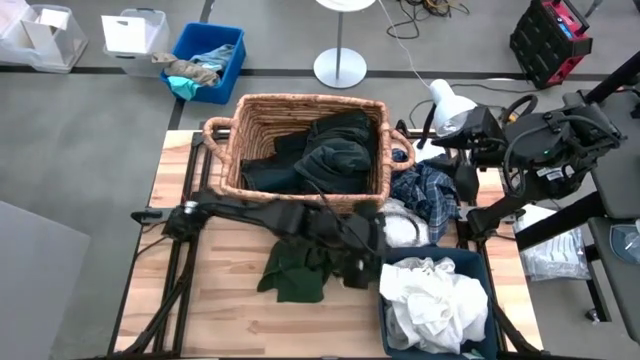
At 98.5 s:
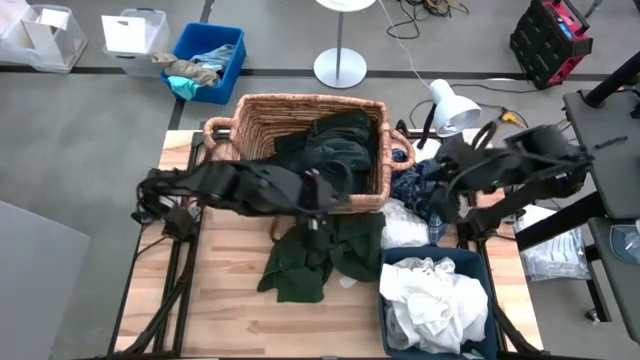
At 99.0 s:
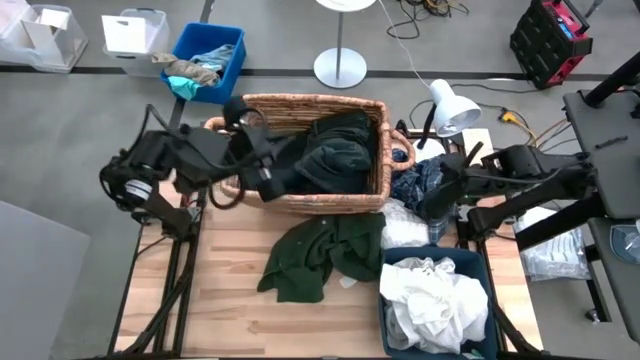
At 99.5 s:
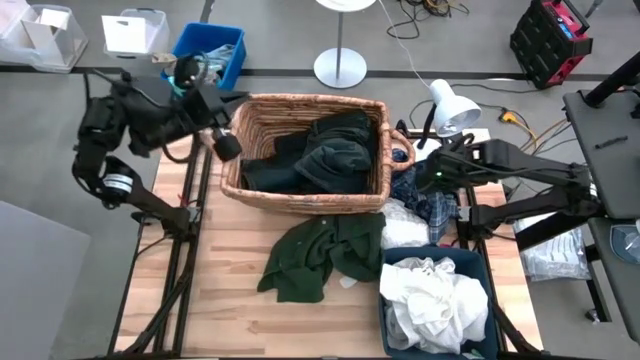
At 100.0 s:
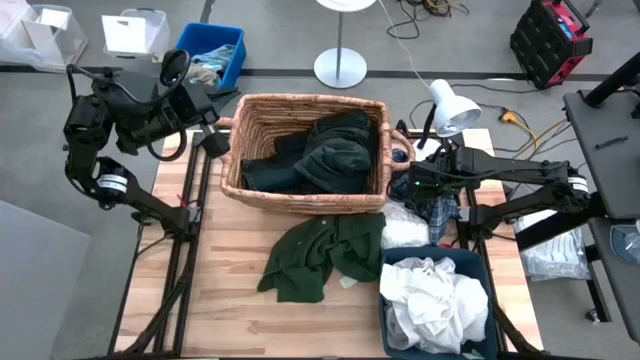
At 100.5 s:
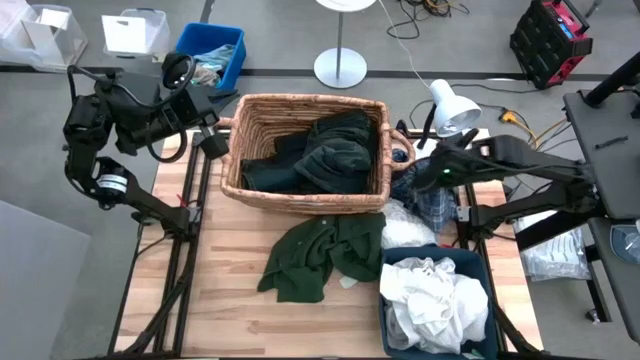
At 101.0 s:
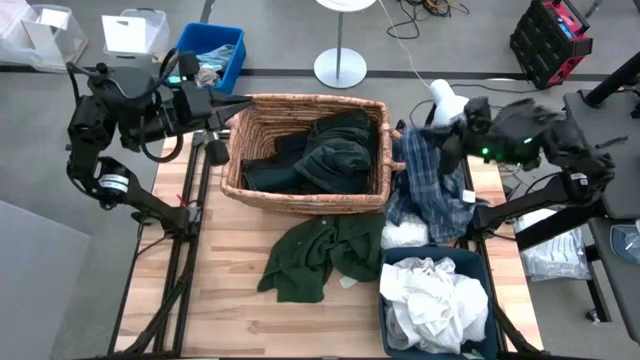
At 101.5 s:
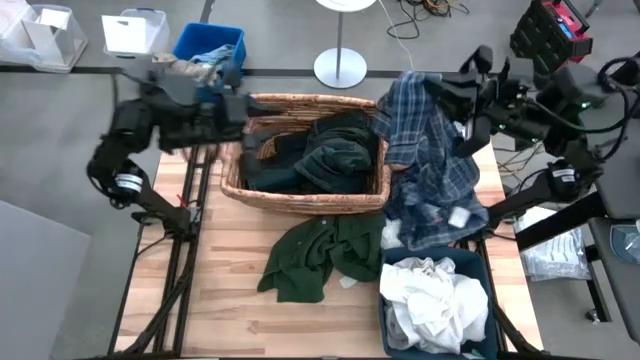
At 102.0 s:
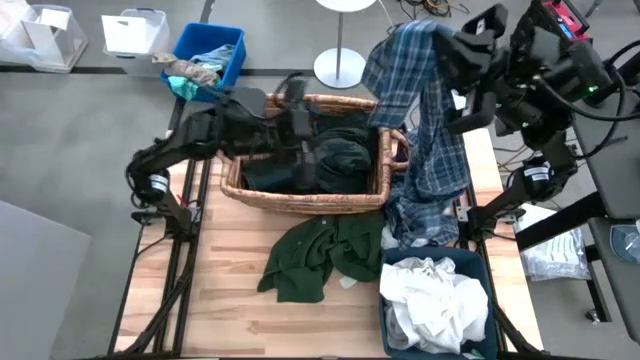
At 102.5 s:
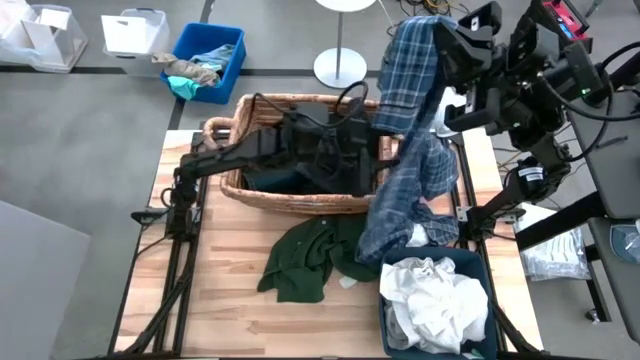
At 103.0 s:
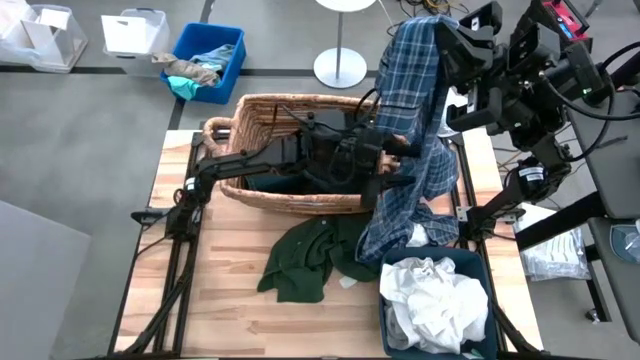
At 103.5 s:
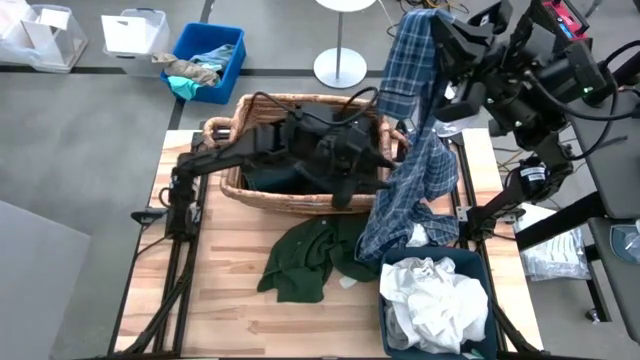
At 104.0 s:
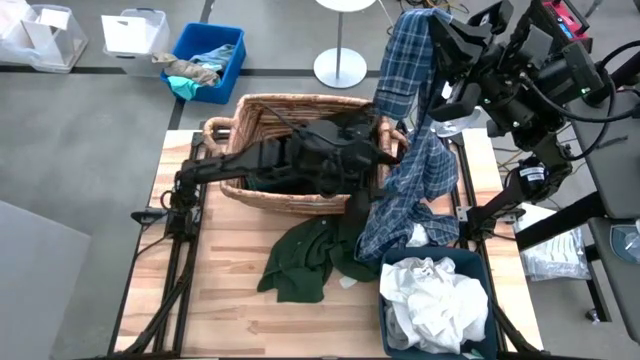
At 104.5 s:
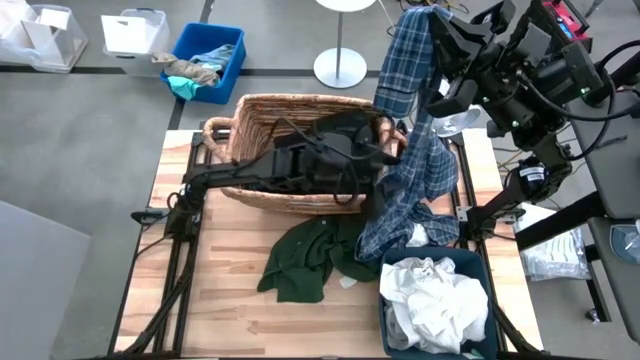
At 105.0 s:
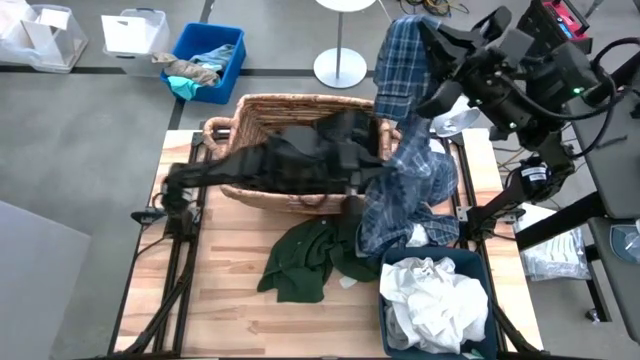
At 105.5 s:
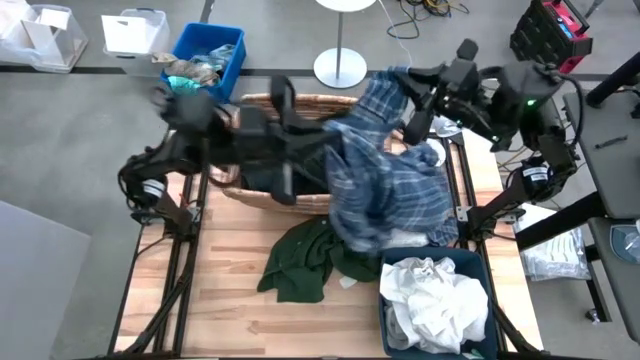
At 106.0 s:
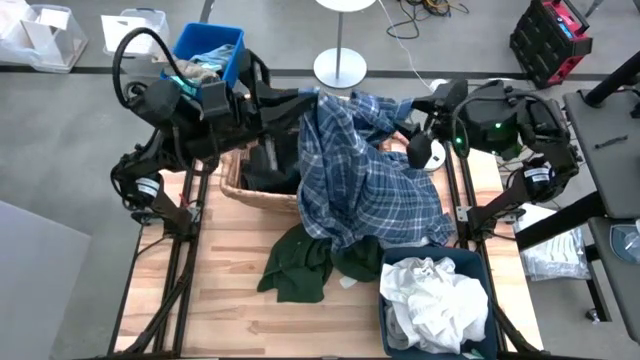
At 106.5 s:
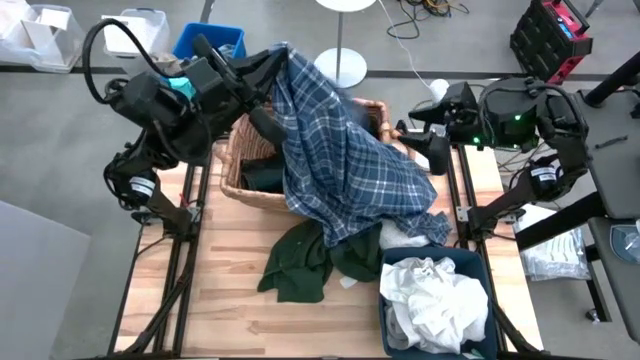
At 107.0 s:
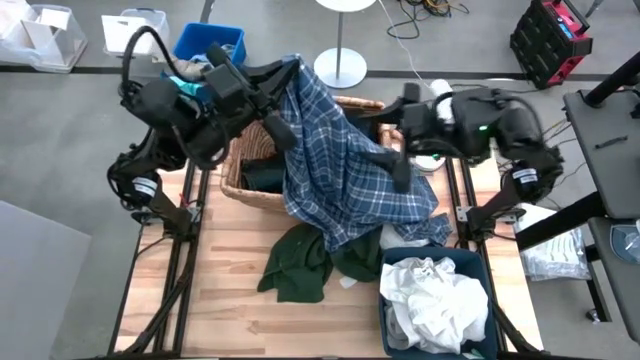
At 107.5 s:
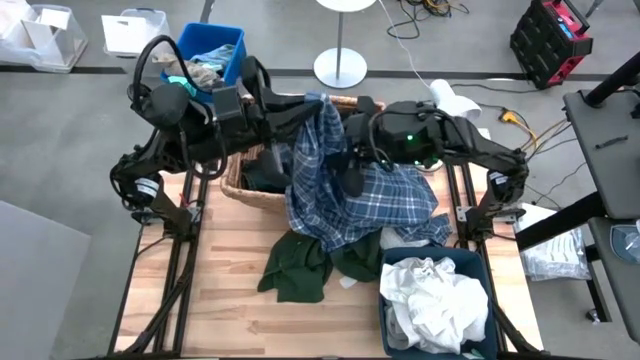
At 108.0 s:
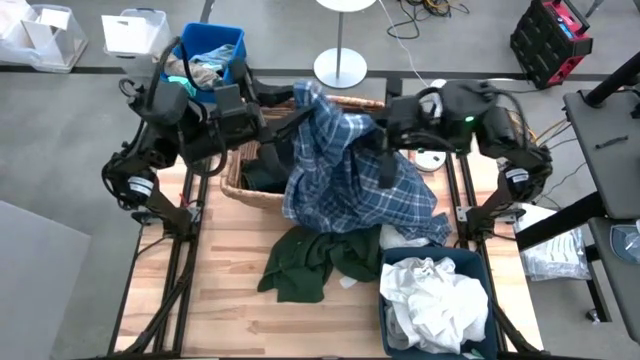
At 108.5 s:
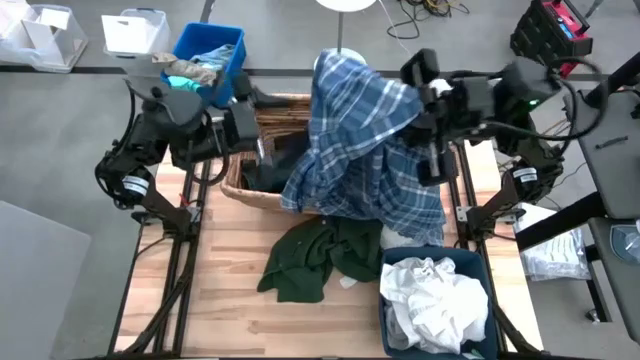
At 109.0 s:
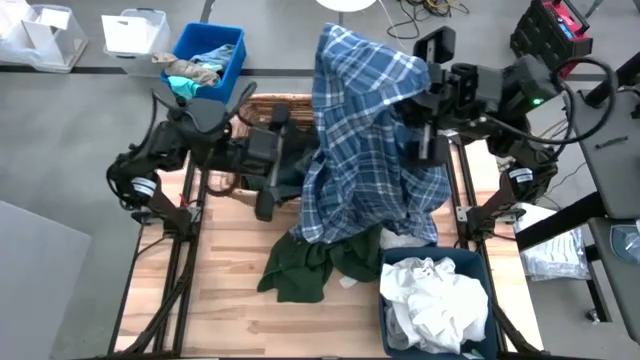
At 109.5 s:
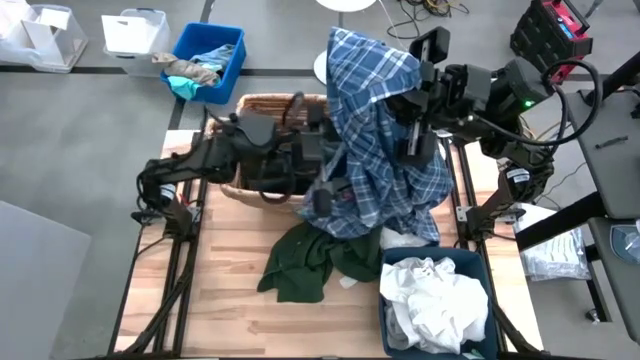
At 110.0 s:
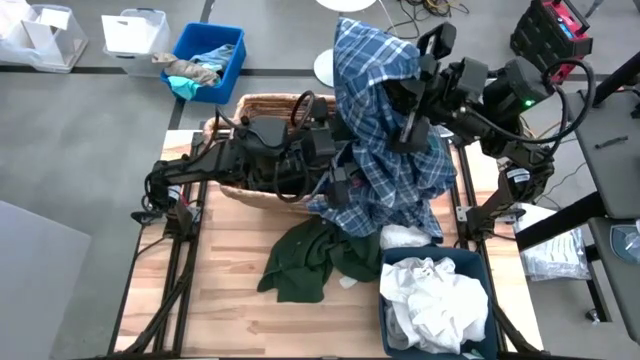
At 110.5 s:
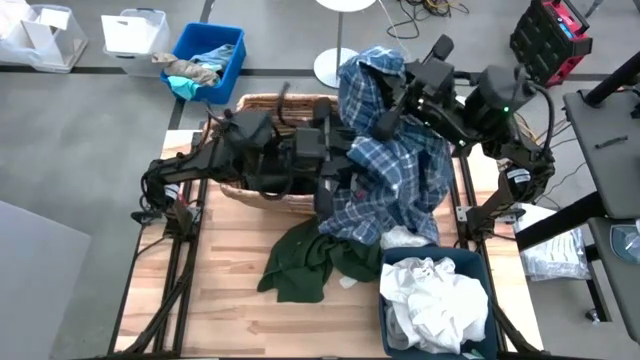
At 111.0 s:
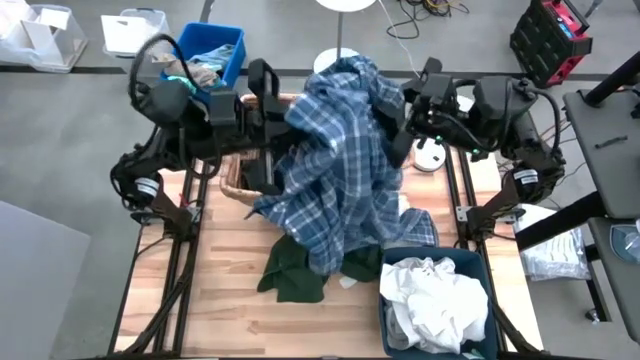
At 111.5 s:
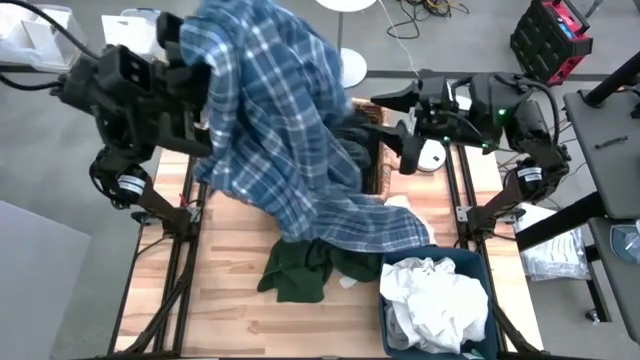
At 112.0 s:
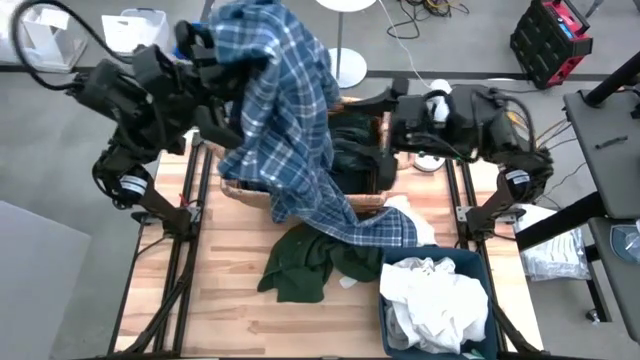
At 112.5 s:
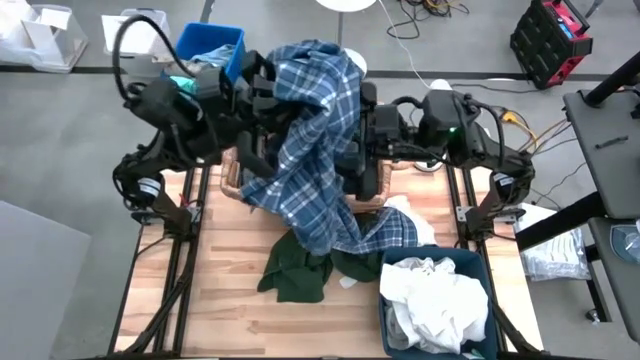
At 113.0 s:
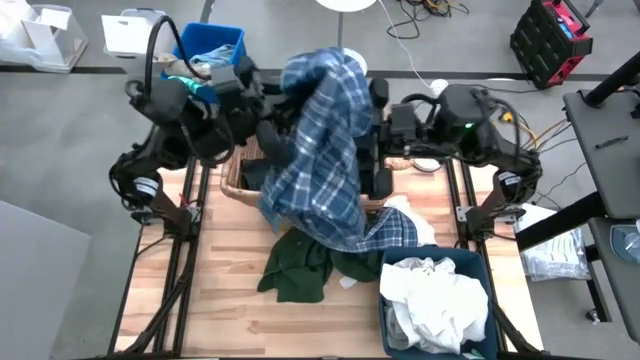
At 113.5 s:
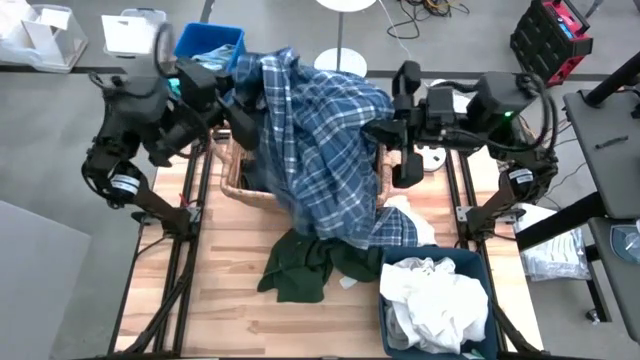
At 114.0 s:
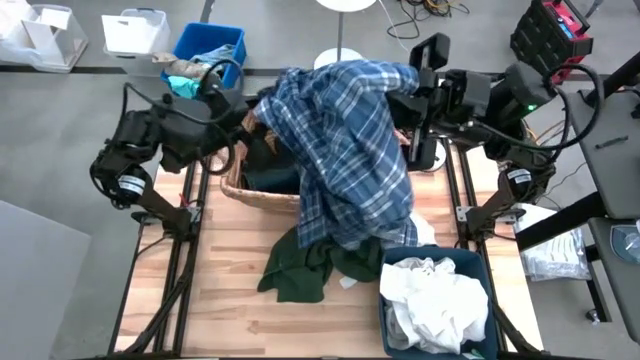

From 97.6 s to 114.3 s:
Task: Sort clothes
Put the blue checkered polo shirt into the brown laundry basket

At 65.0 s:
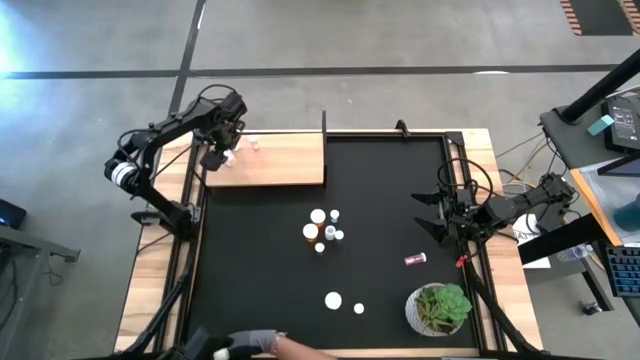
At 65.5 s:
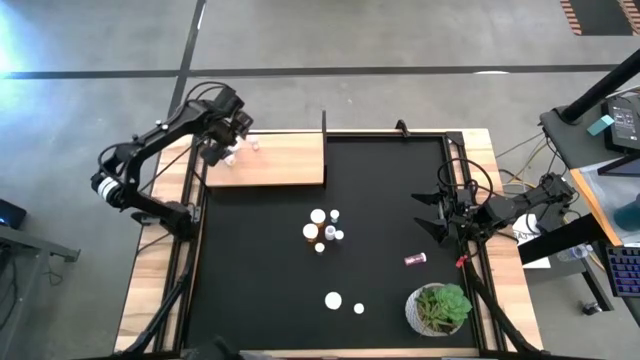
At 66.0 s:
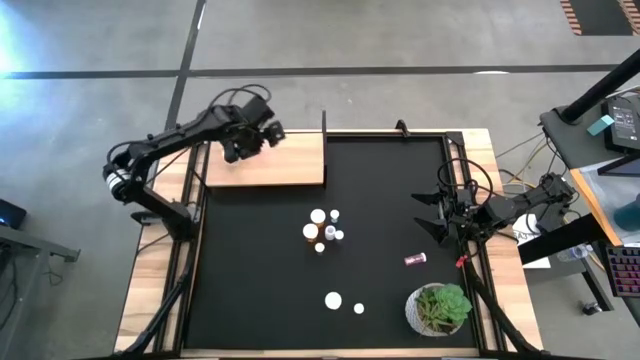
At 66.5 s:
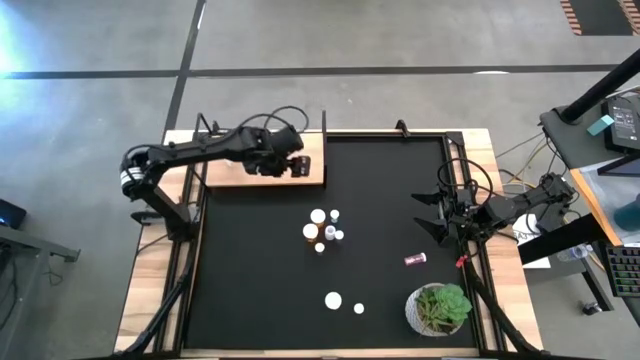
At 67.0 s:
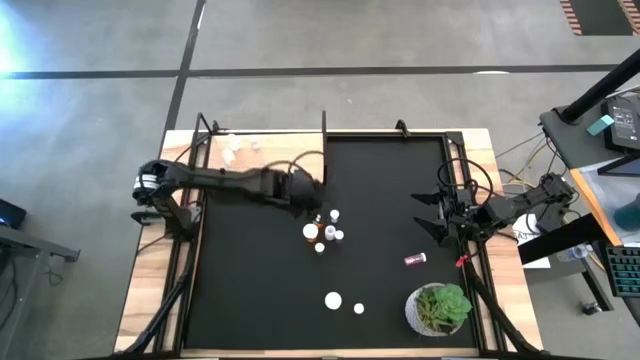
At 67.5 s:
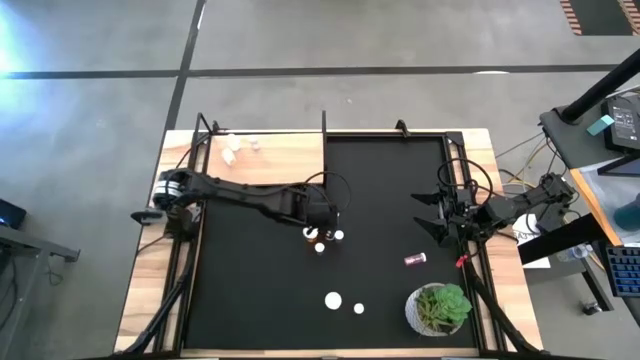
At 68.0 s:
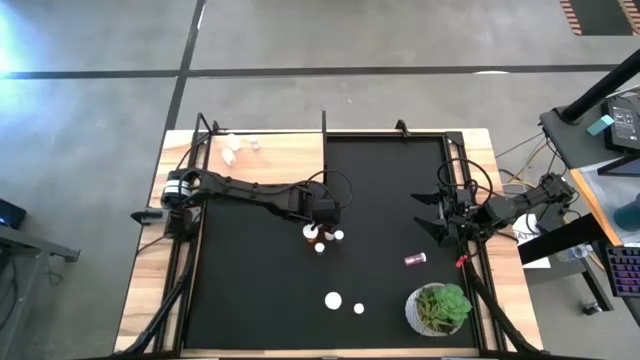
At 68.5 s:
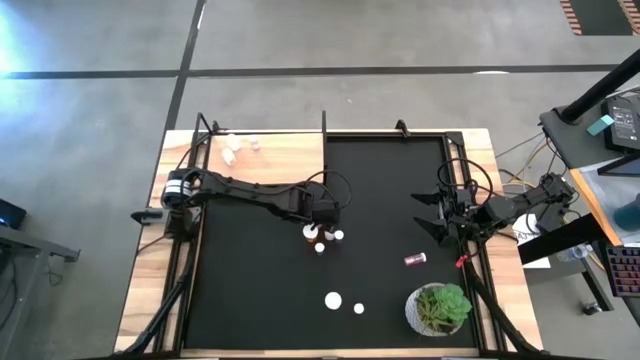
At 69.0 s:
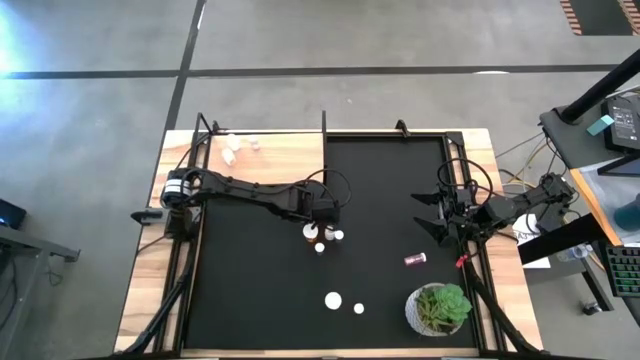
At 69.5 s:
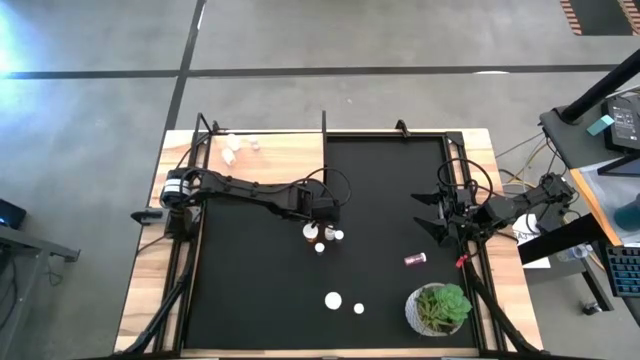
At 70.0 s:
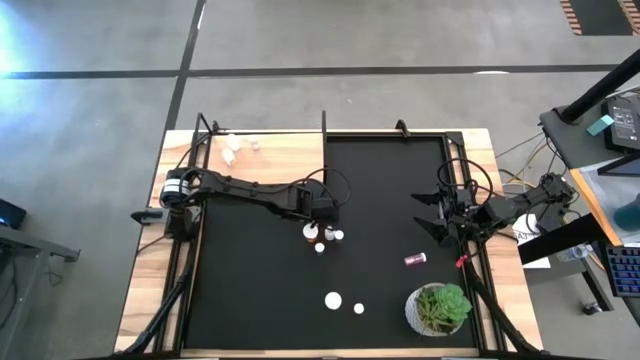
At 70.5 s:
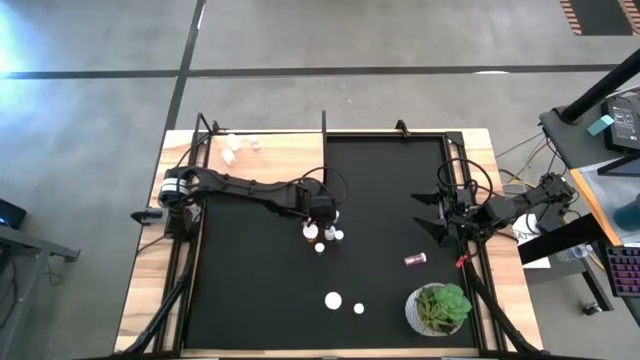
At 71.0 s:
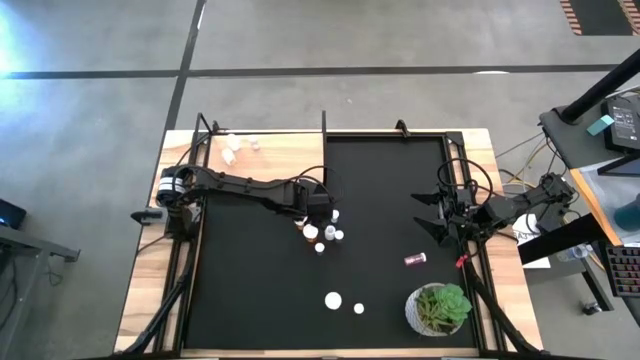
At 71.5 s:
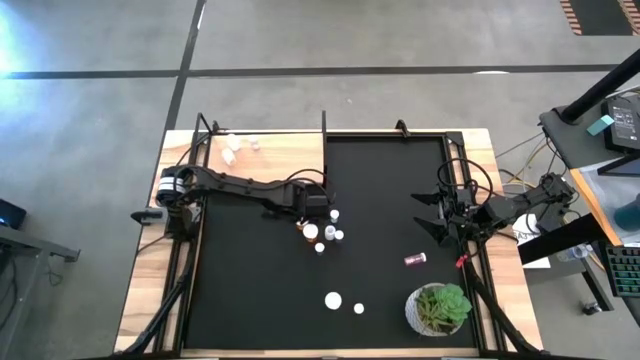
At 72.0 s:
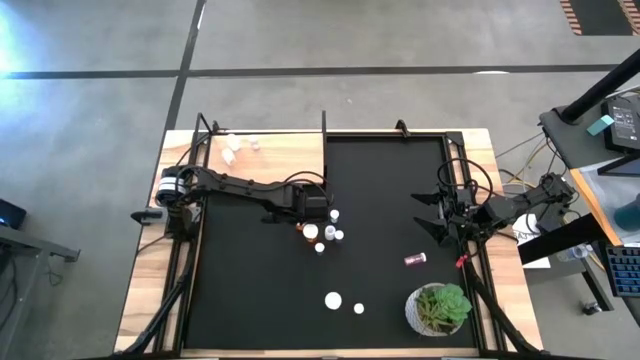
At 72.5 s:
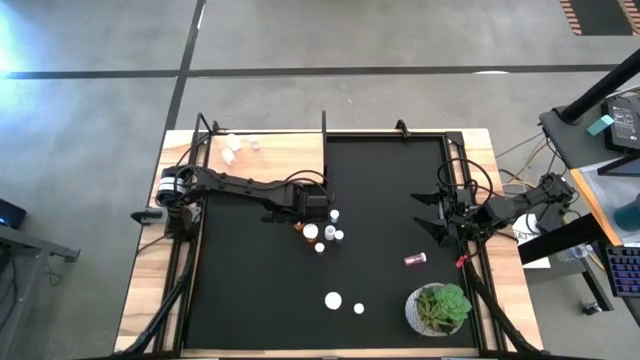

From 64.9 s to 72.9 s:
Task: Pick and place medicine bottles onto shelf by color
Put the top orange pill bottle on the shelf
